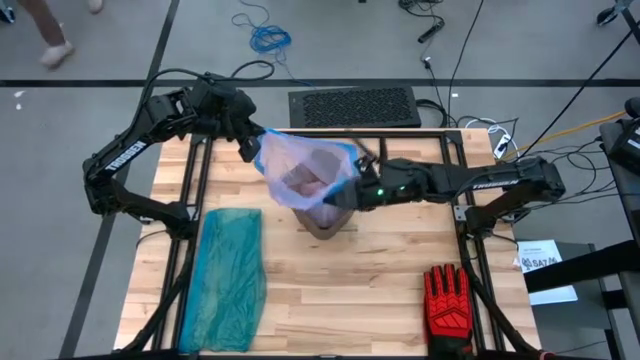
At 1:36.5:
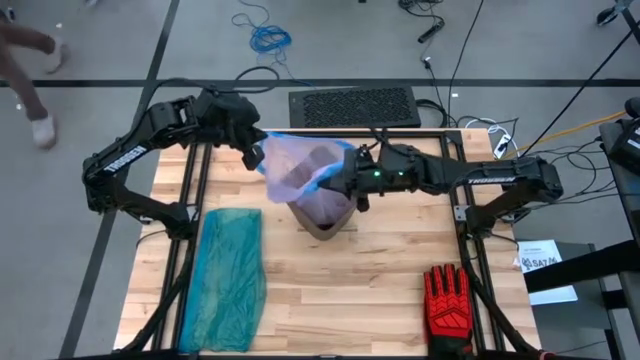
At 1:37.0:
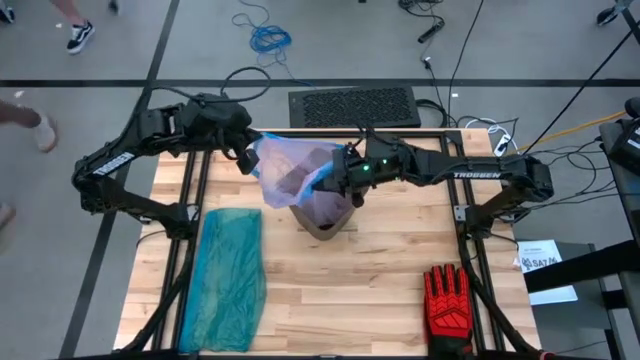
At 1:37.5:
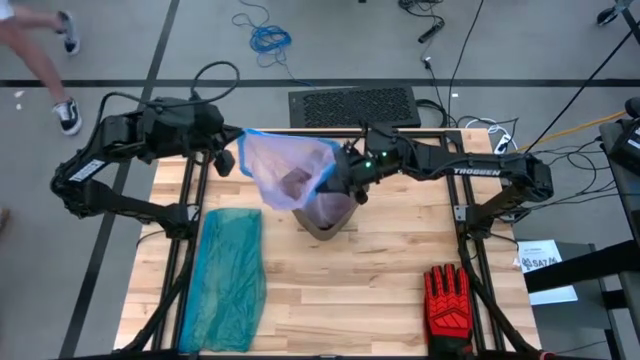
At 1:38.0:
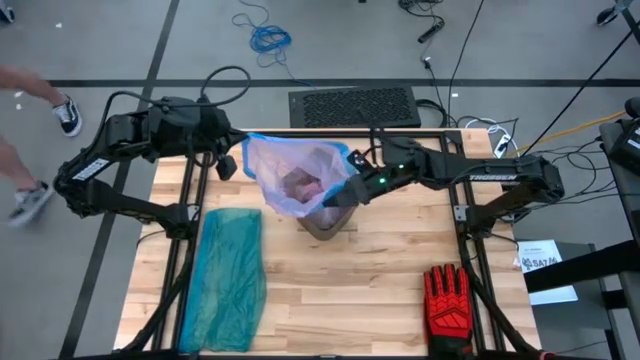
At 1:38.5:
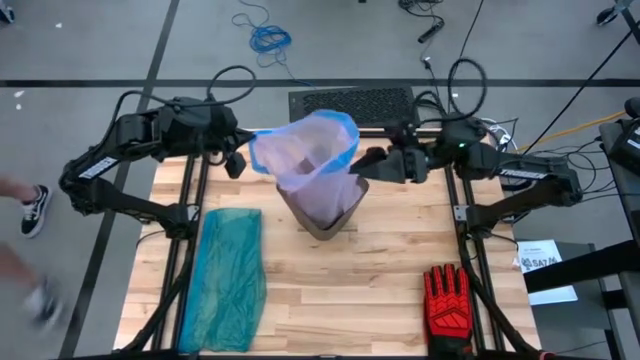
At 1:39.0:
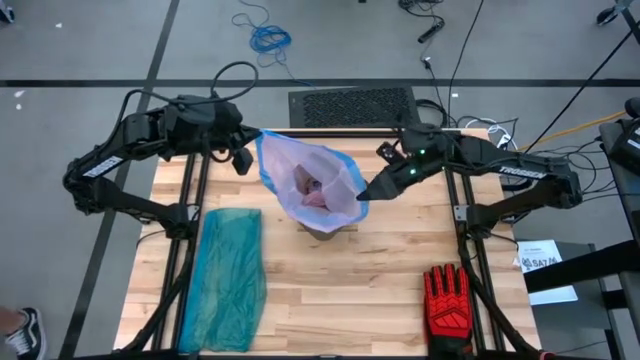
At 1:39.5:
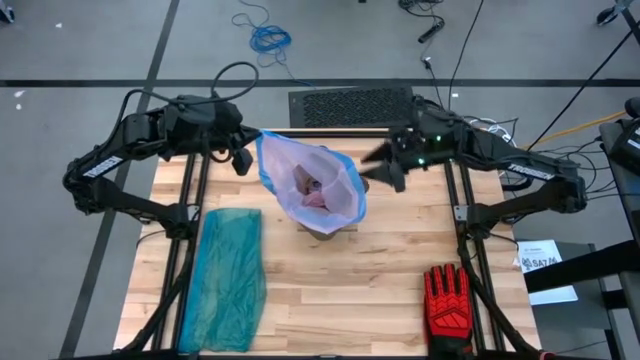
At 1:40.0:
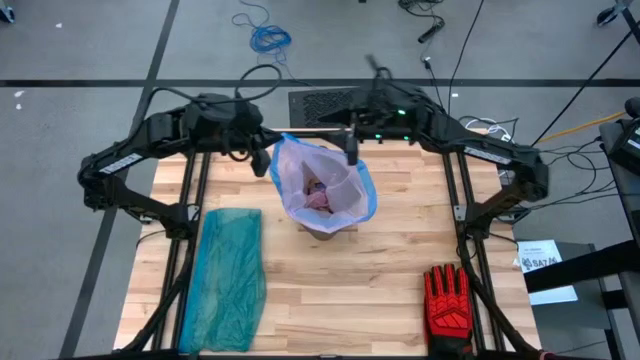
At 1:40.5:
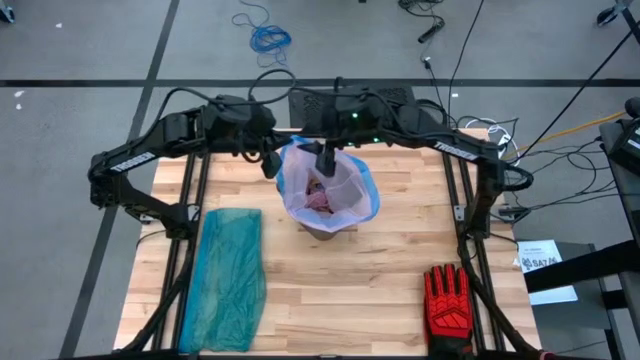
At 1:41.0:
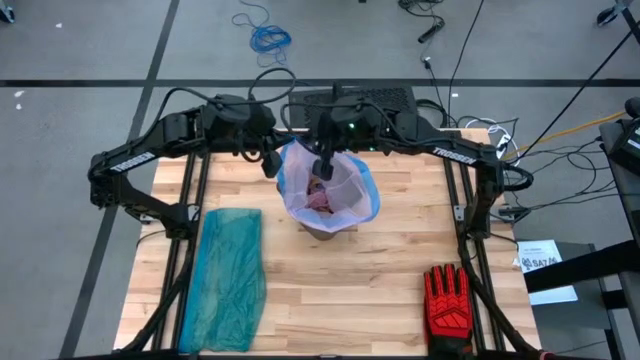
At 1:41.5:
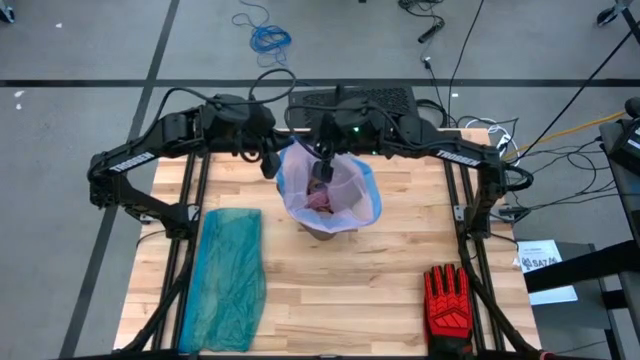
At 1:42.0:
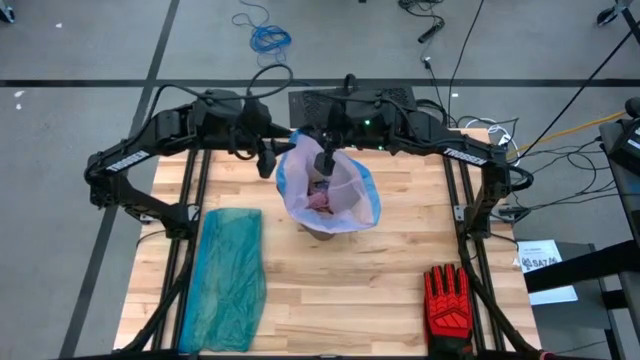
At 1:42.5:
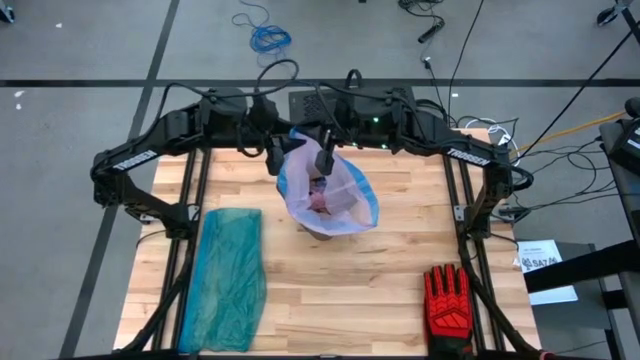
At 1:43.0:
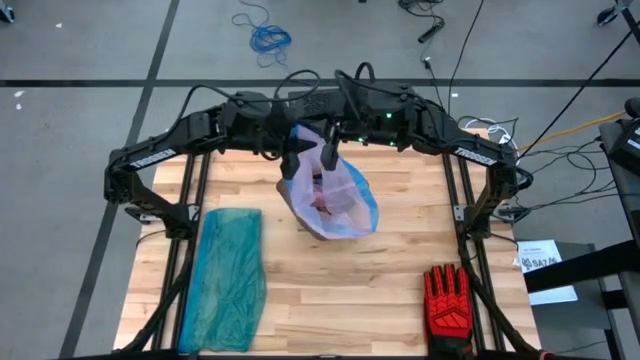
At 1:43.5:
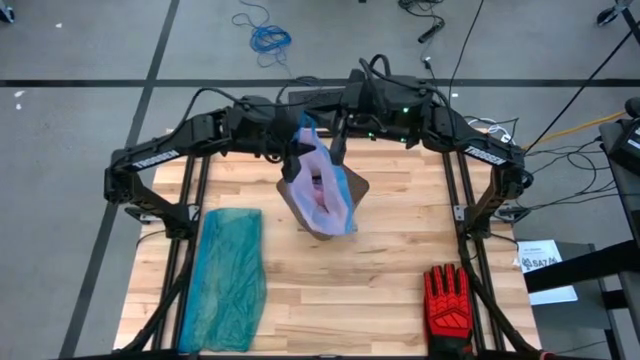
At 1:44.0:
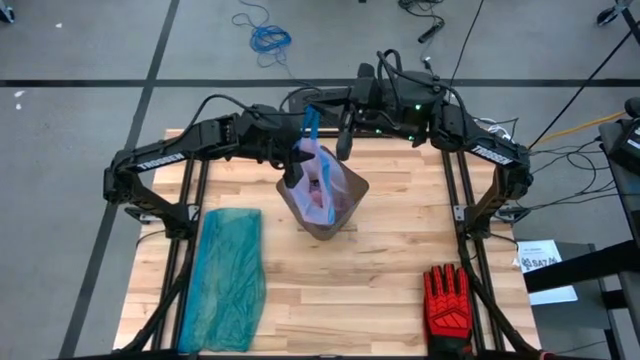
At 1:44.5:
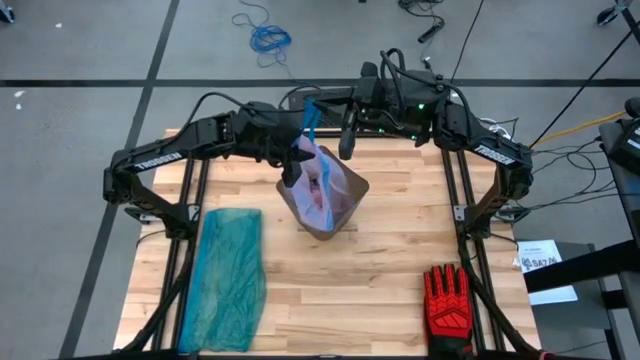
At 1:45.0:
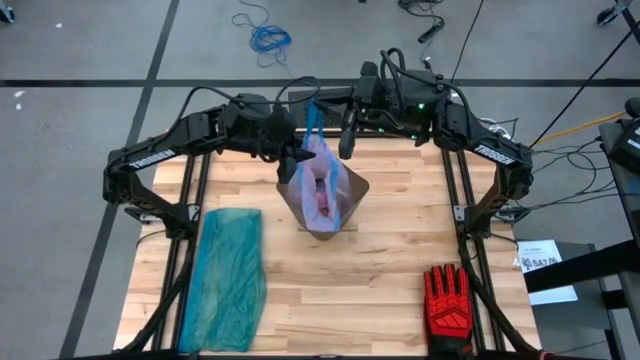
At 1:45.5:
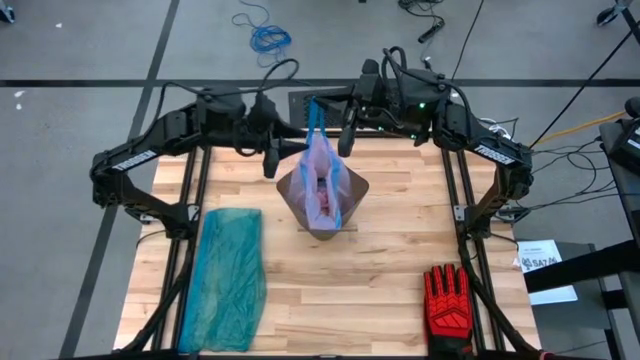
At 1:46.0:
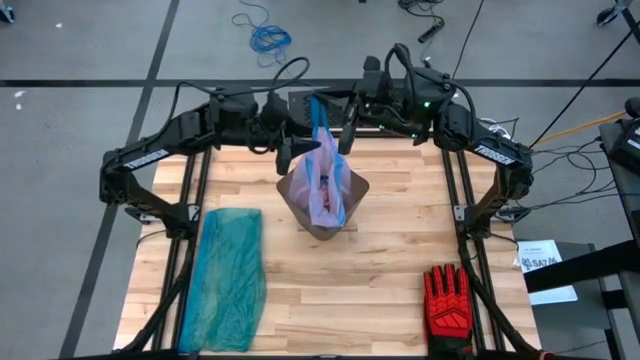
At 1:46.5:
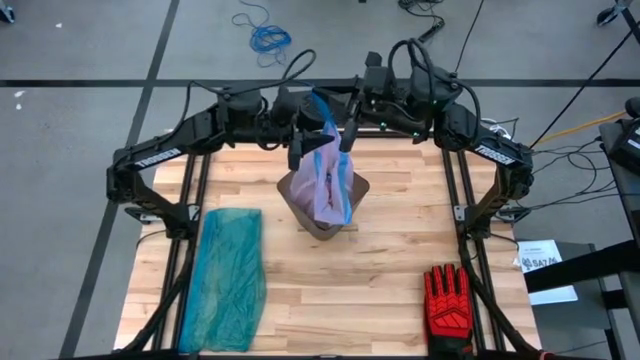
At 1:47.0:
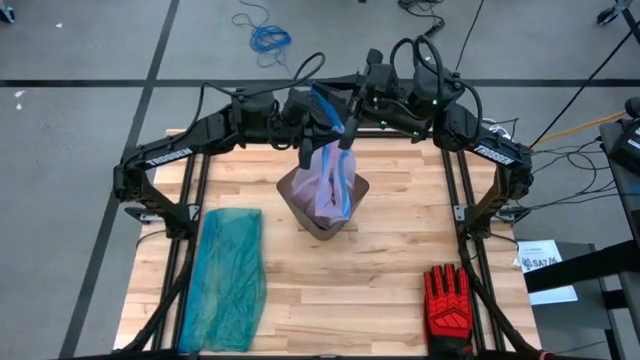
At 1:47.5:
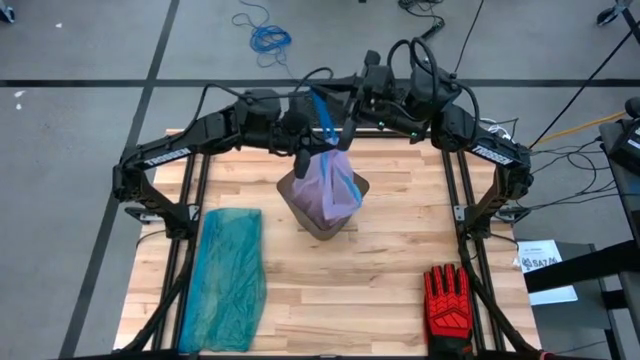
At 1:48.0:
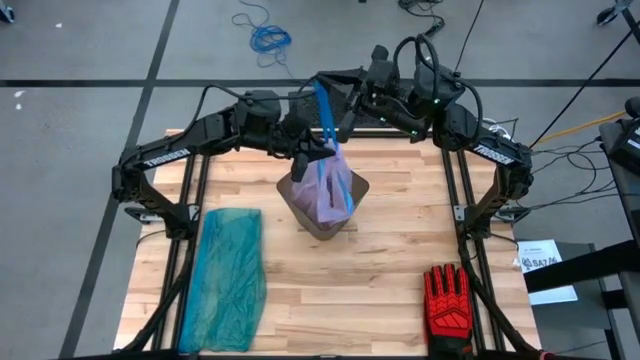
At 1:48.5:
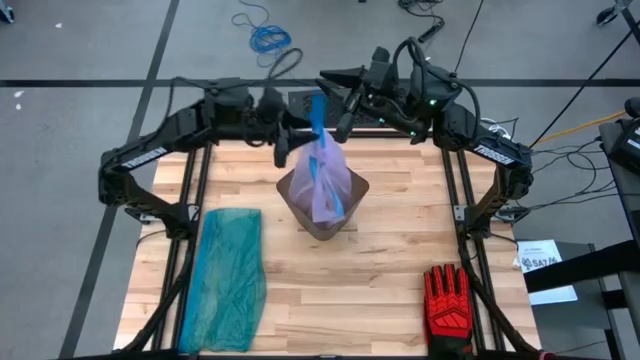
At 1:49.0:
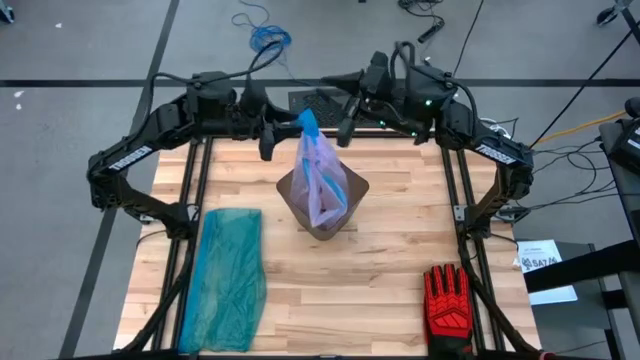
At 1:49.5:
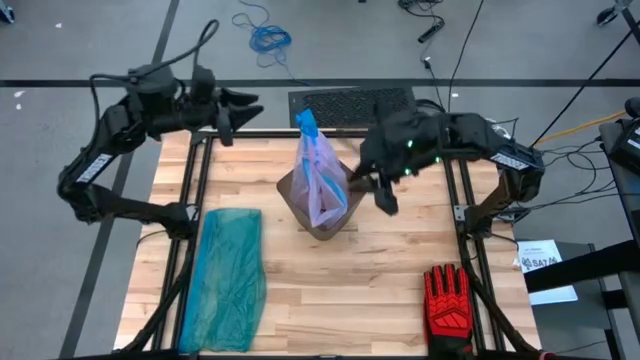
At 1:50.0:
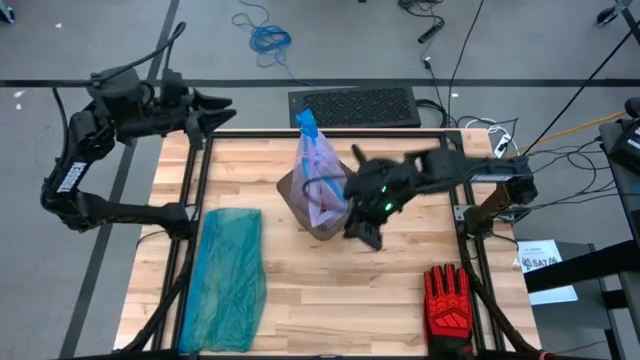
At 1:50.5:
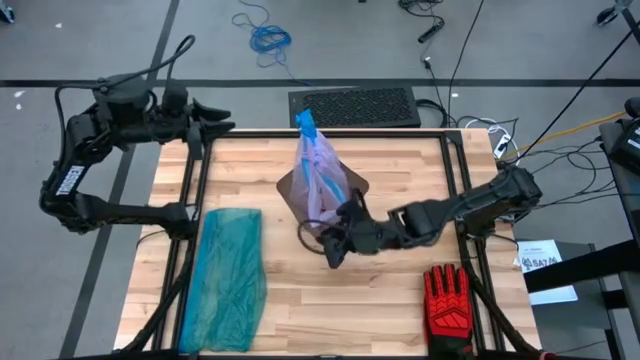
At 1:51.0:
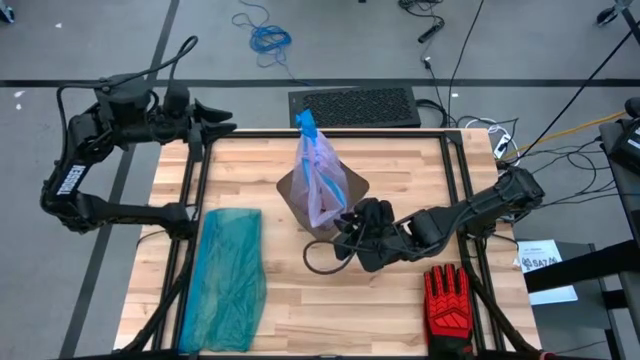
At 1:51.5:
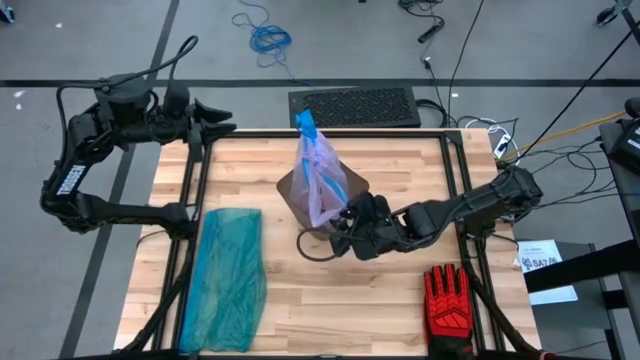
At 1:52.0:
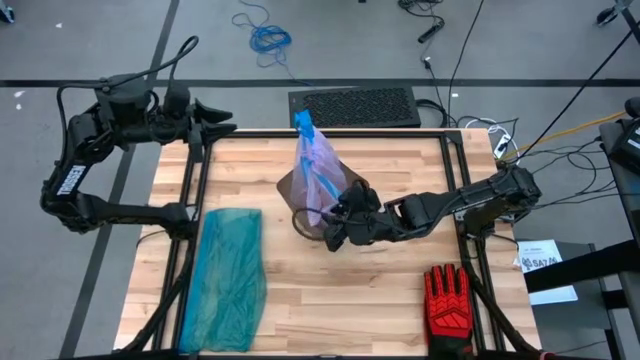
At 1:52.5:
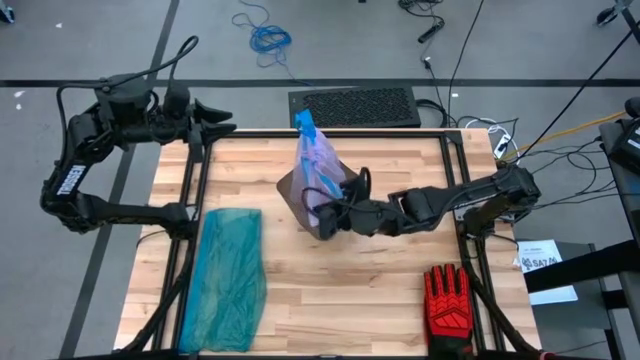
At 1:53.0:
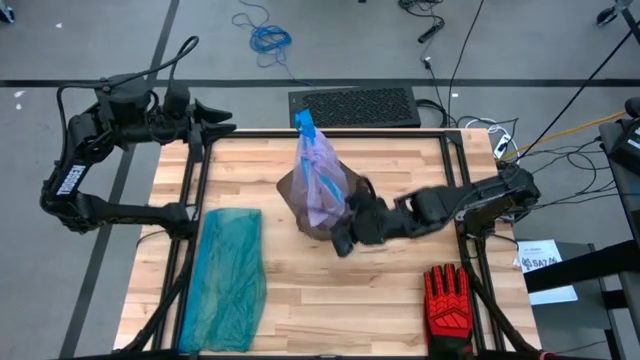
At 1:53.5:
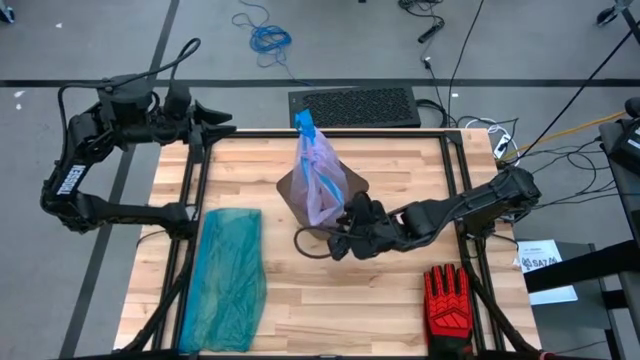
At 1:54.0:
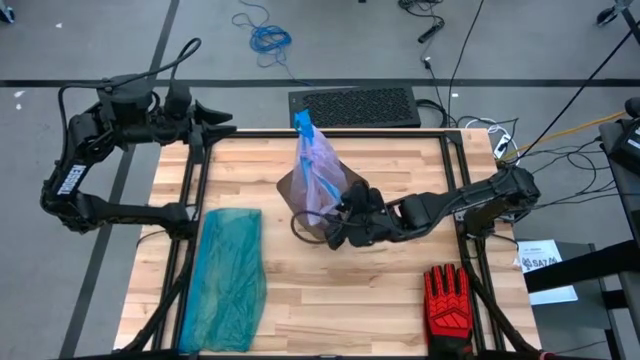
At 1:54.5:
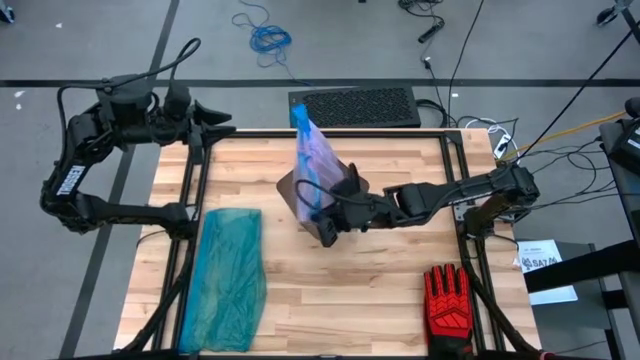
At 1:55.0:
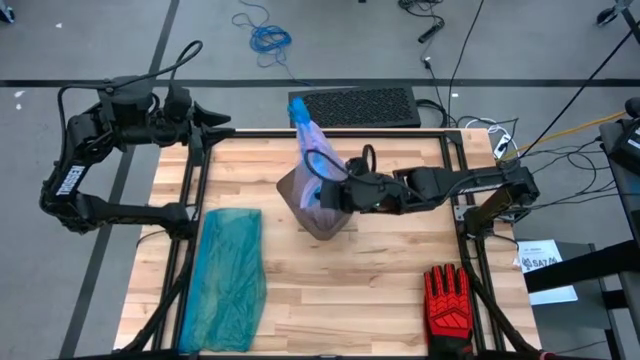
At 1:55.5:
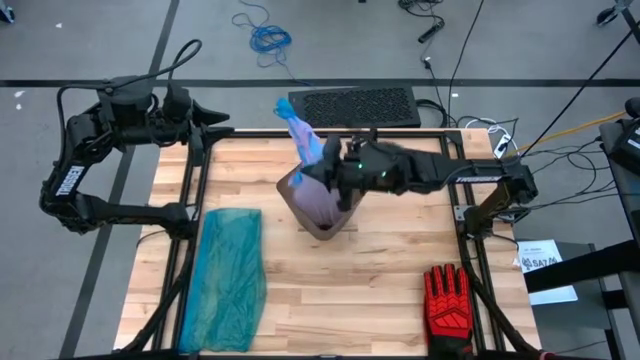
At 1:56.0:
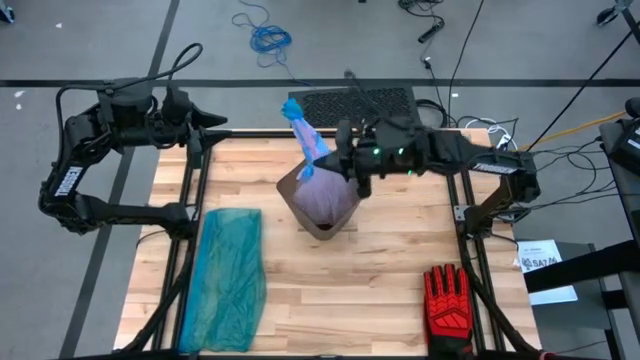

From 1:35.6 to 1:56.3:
Task: place trash/remove bag and relplace
Close the trash bag
